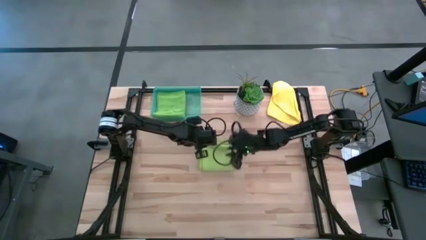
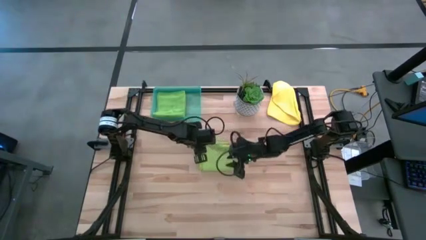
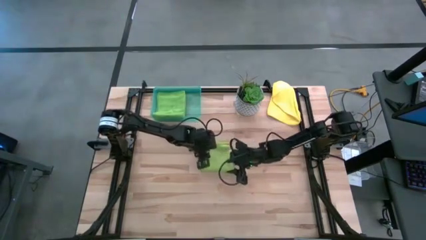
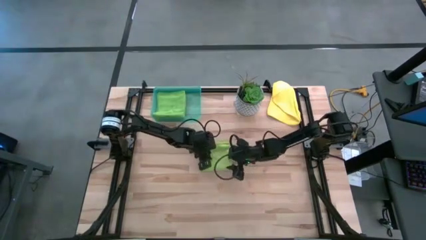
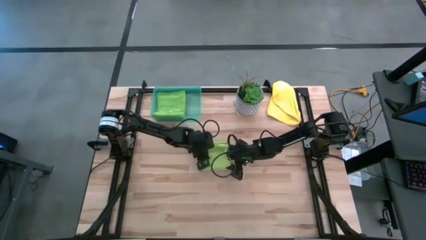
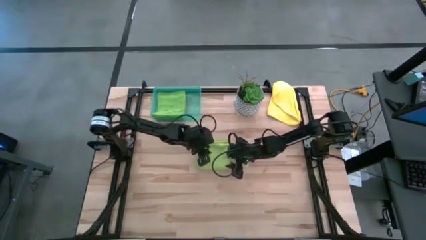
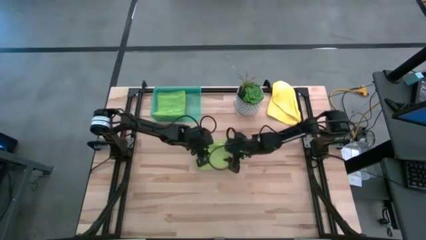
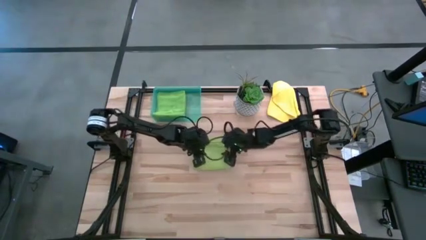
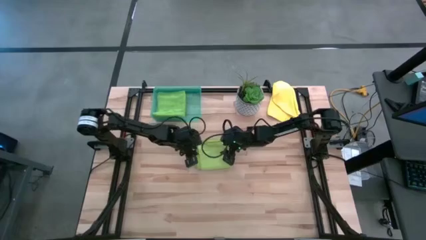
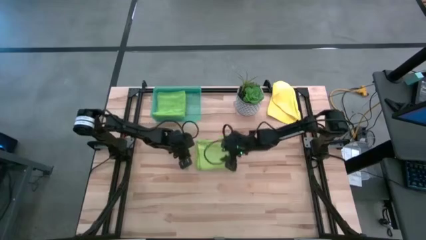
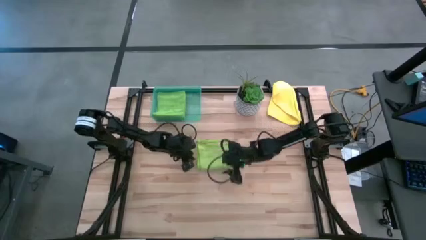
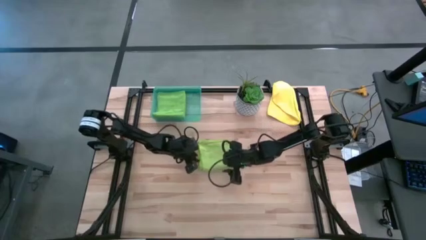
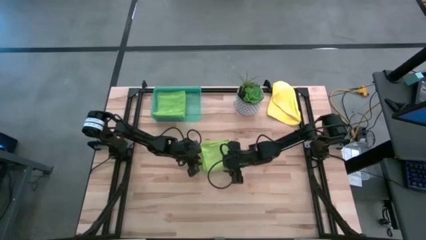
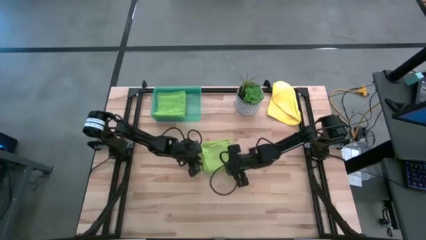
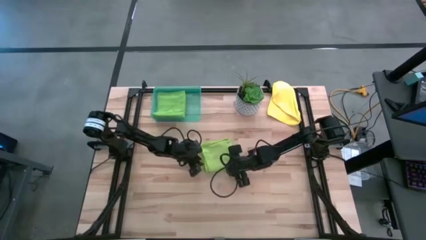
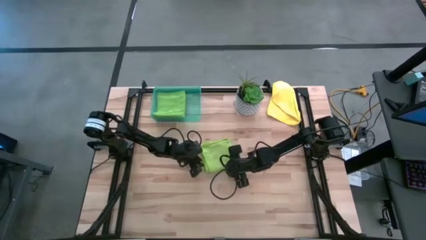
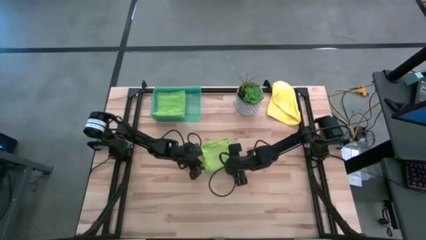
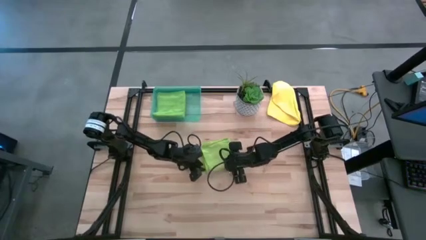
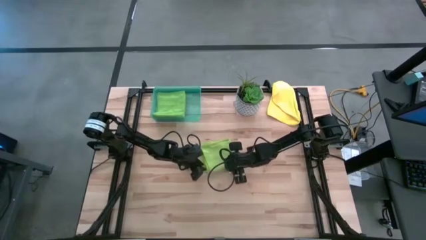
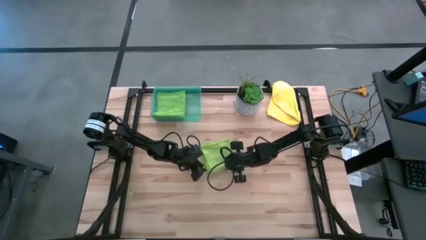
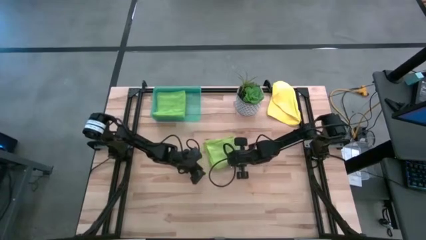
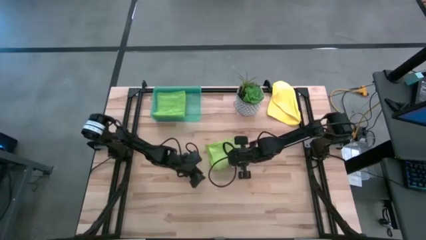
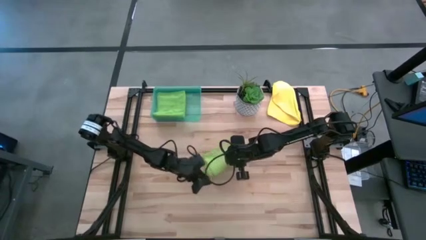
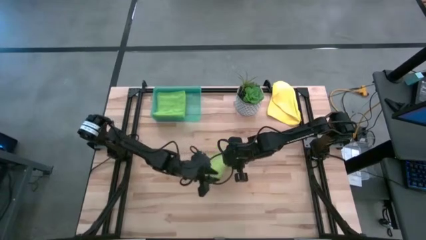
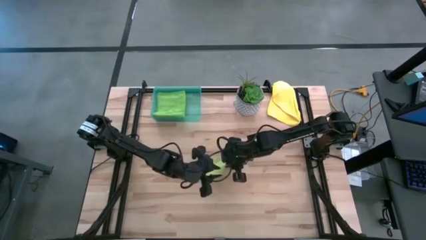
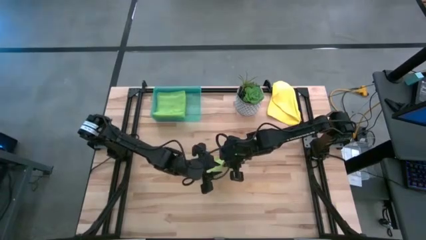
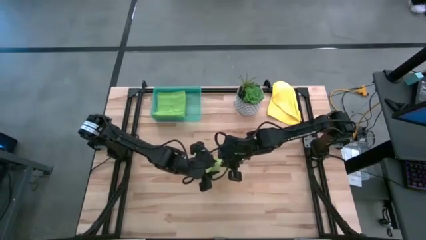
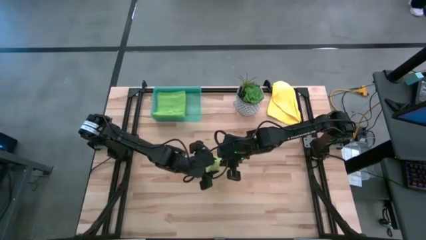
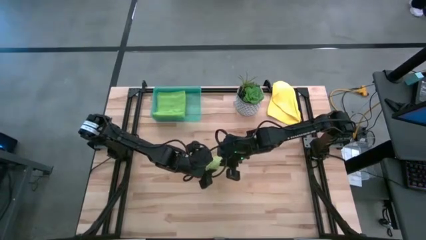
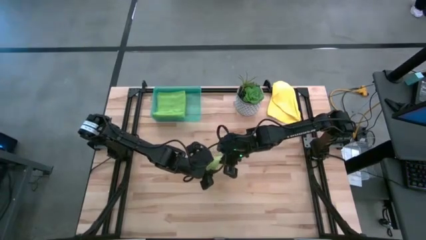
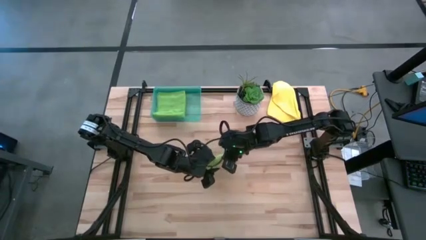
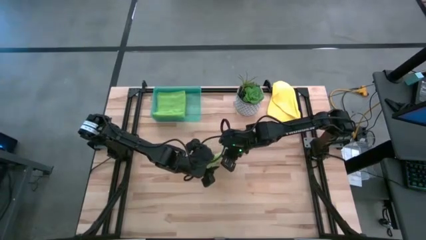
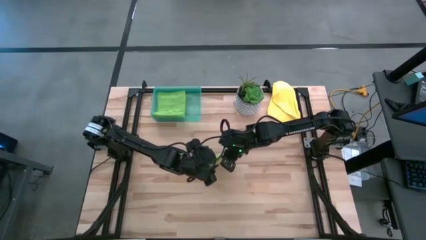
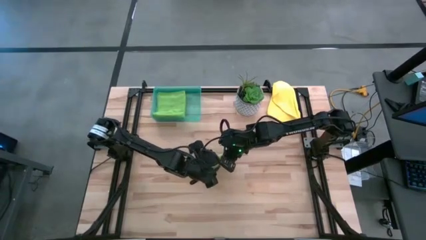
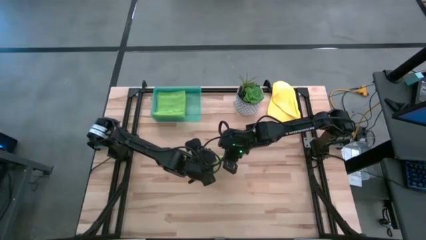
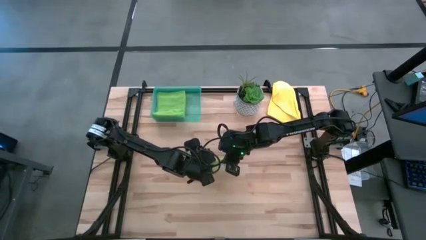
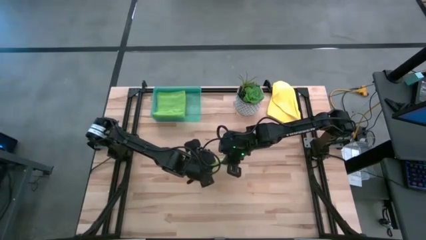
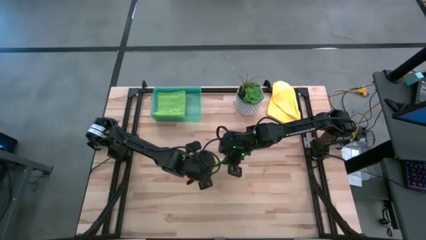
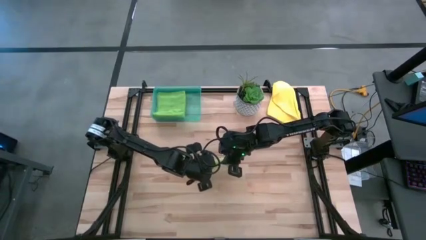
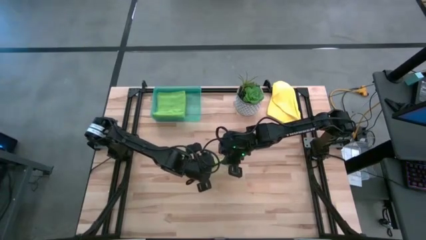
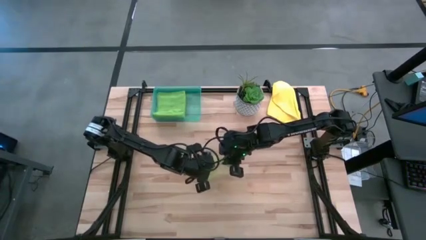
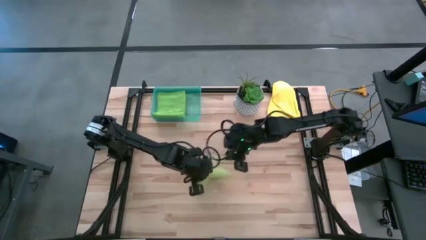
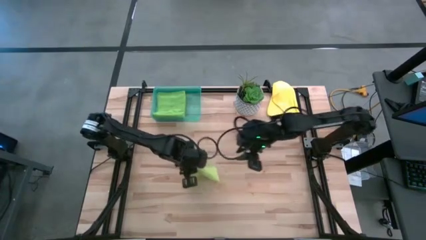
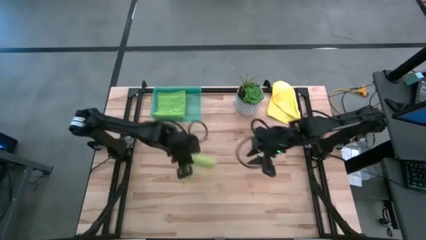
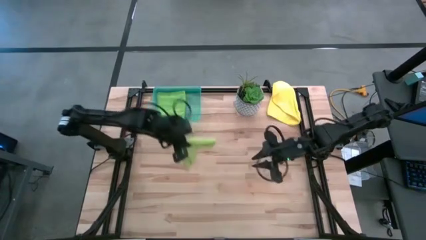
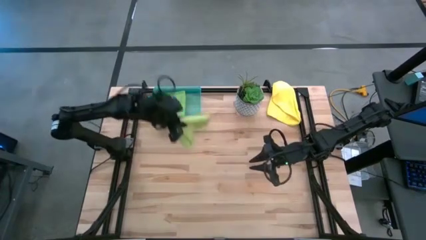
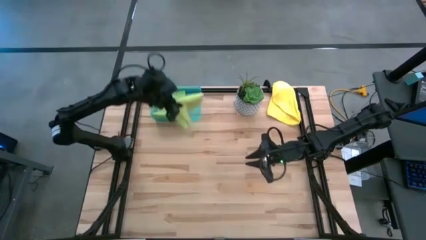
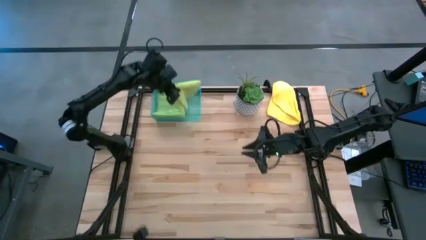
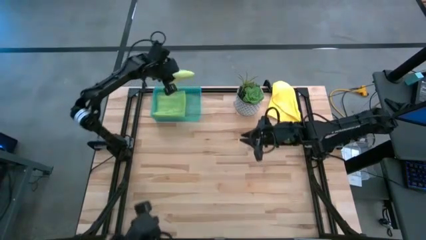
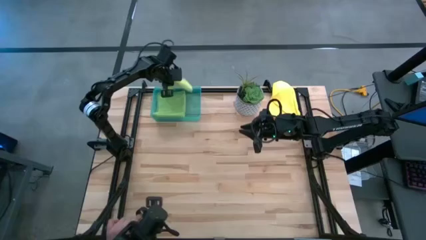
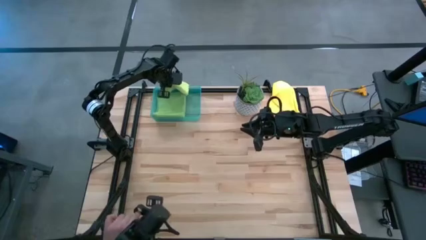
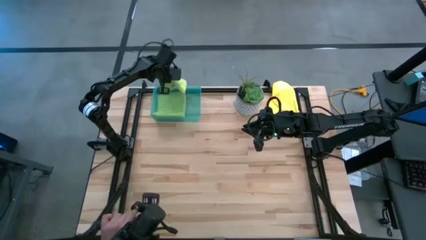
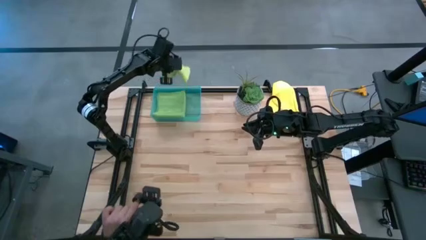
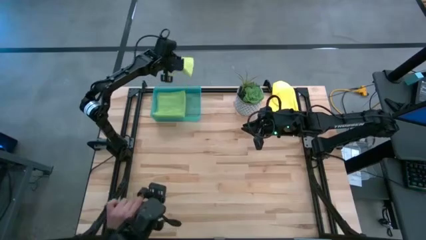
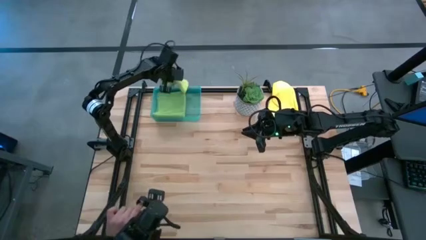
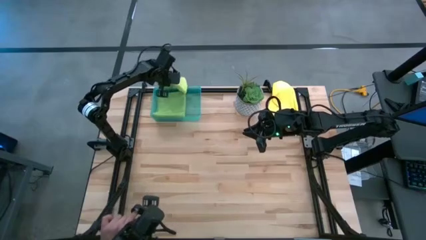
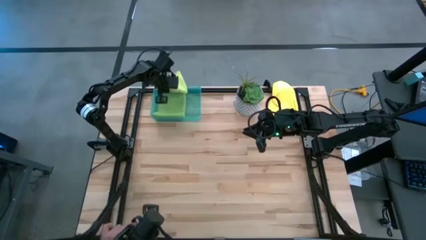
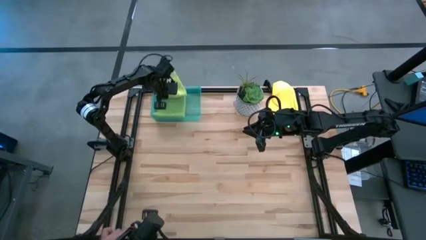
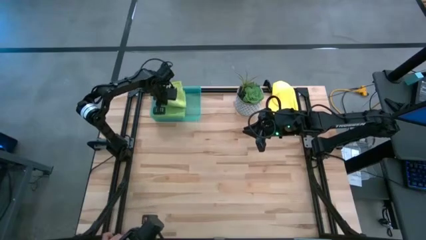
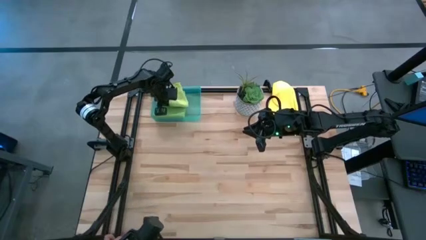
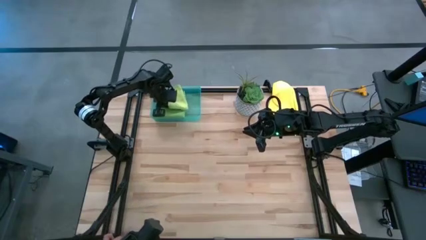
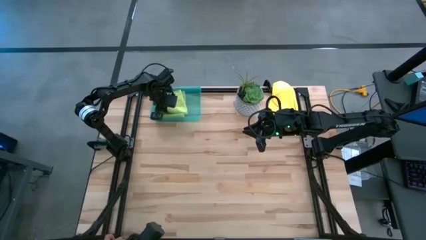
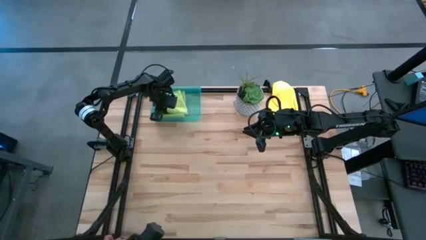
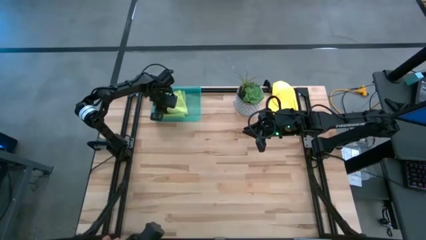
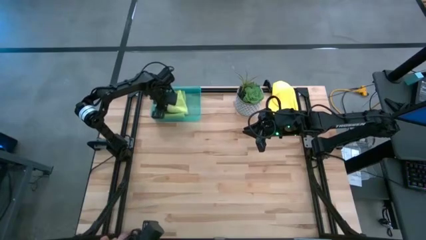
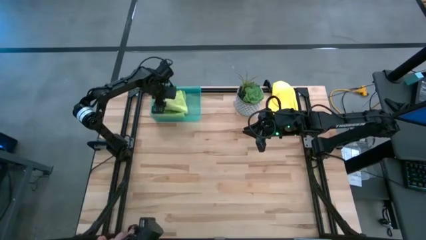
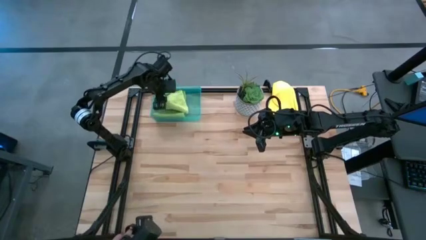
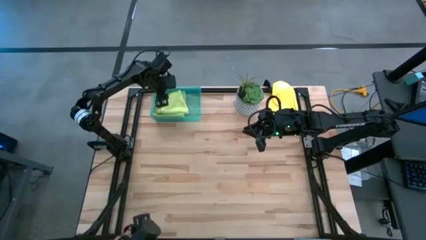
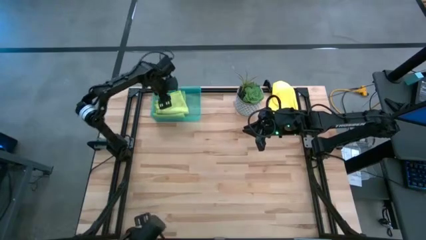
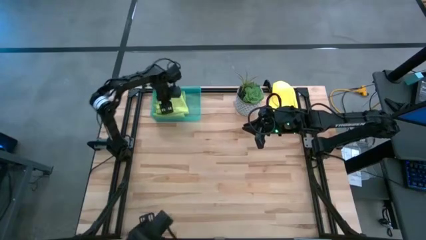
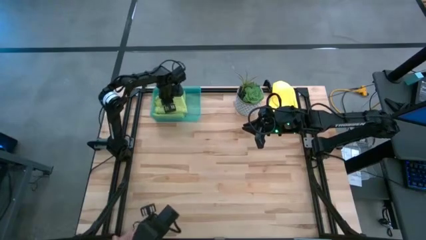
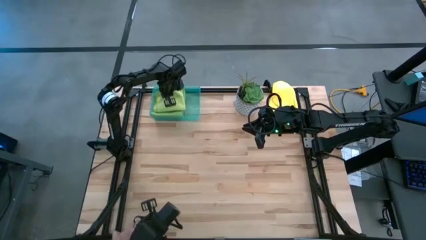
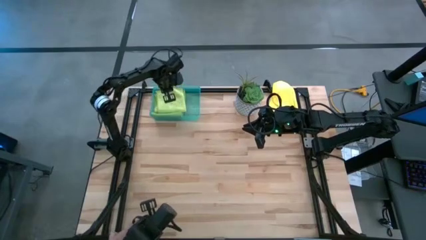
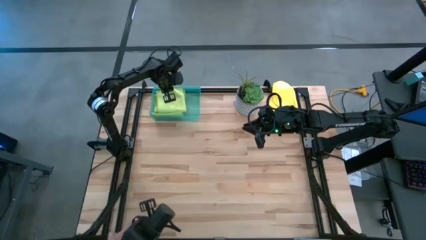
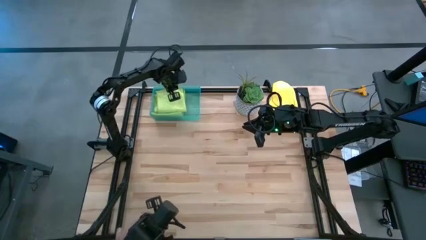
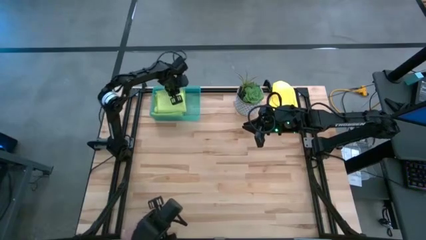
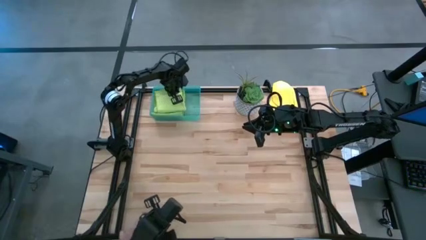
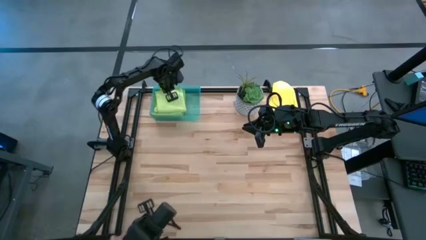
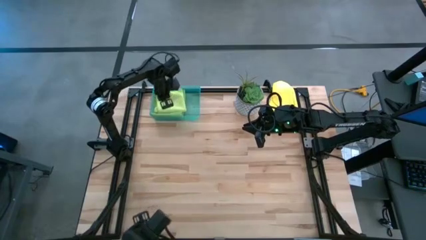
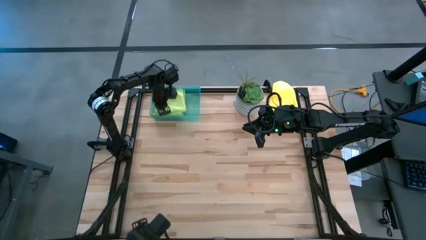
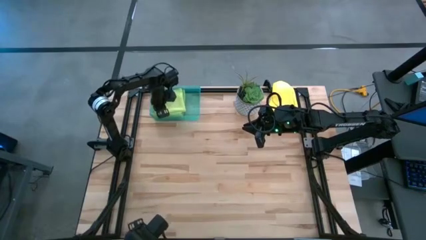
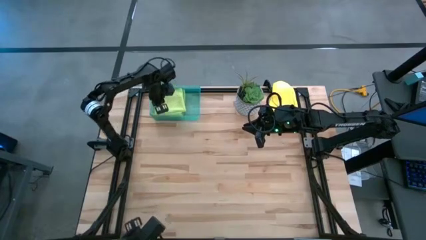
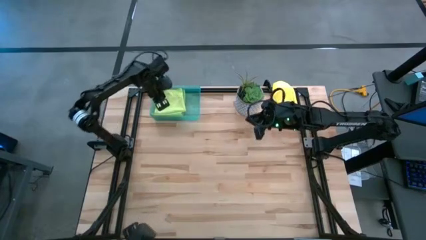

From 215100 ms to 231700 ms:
Task: Fold microfiber towels
Put the yellow-green microfiber cloth into the blue bin
